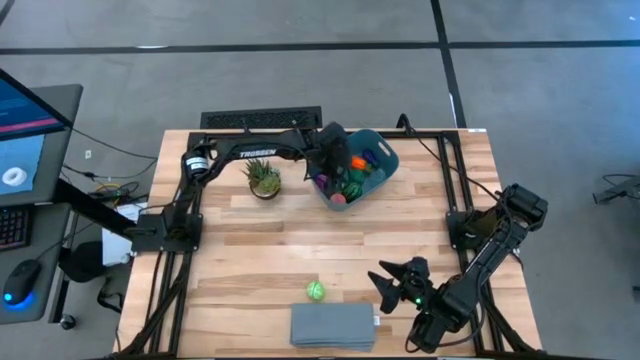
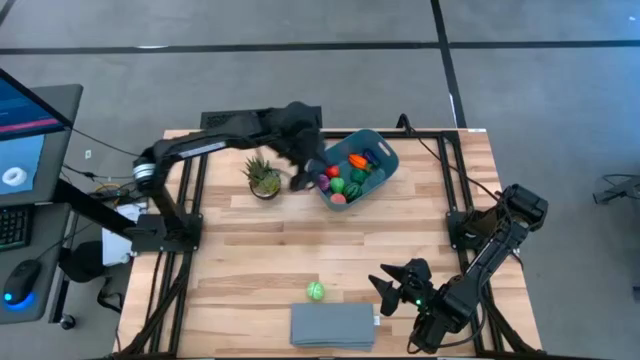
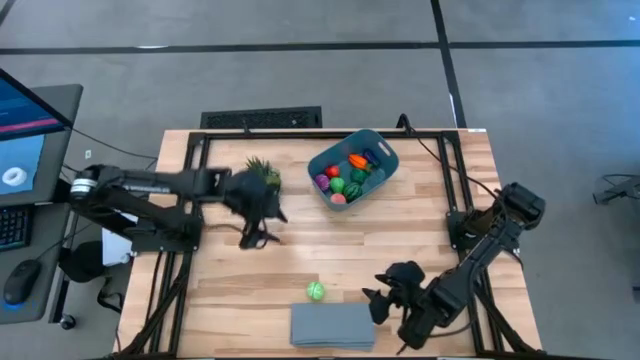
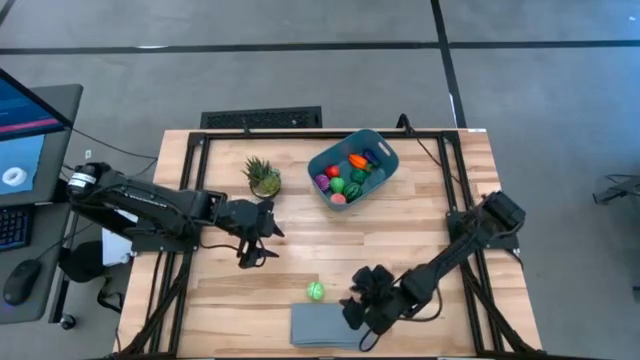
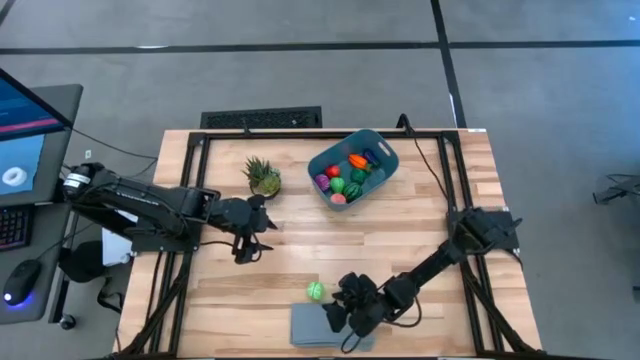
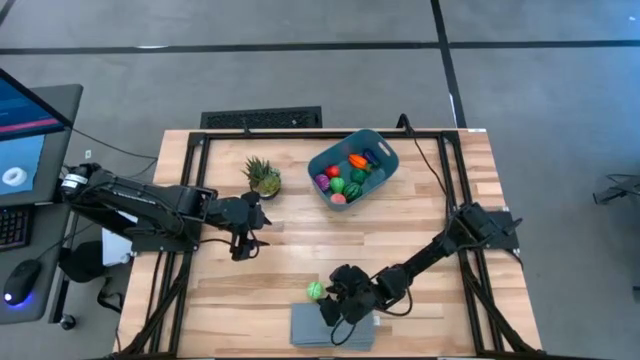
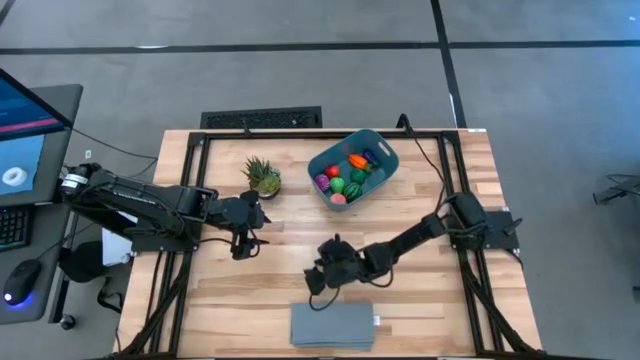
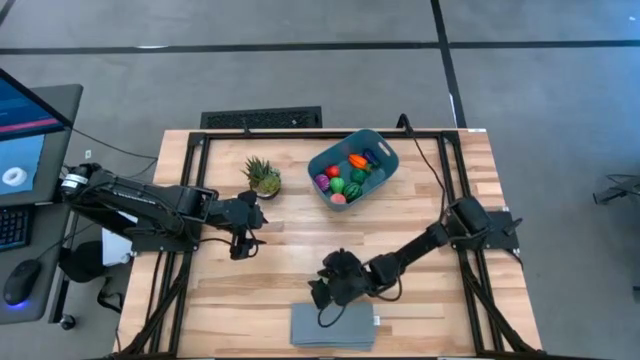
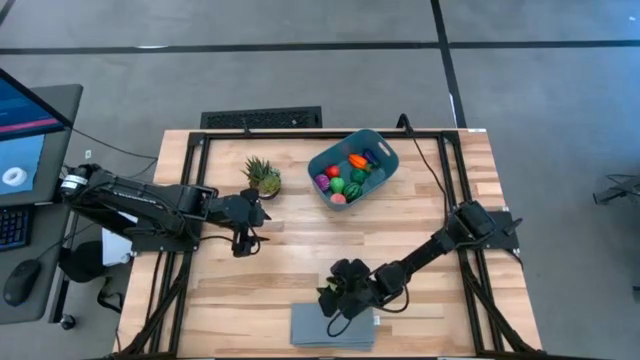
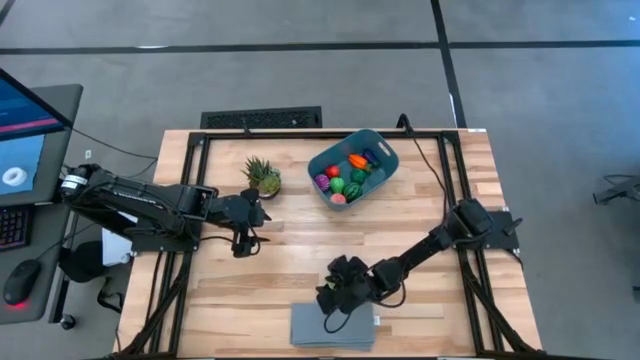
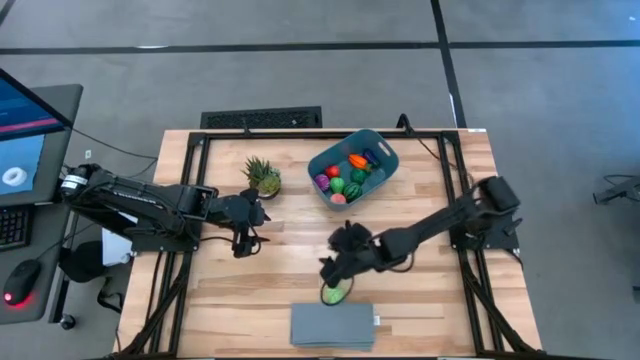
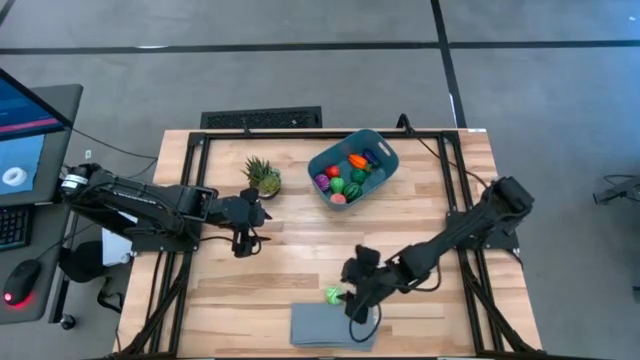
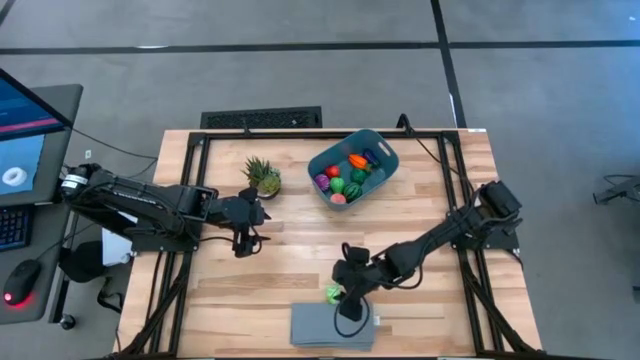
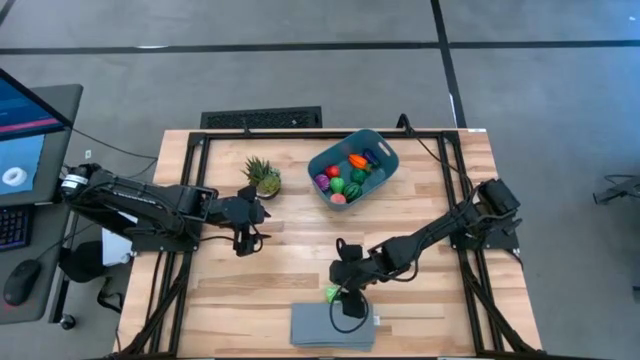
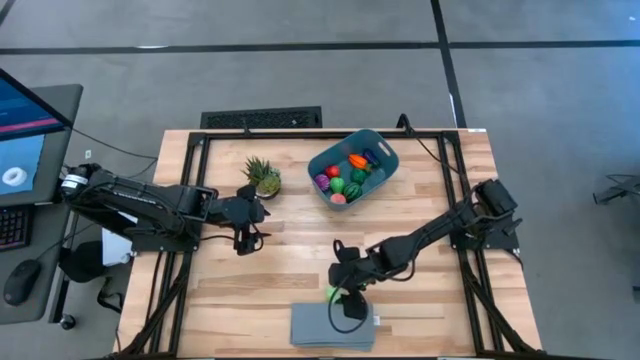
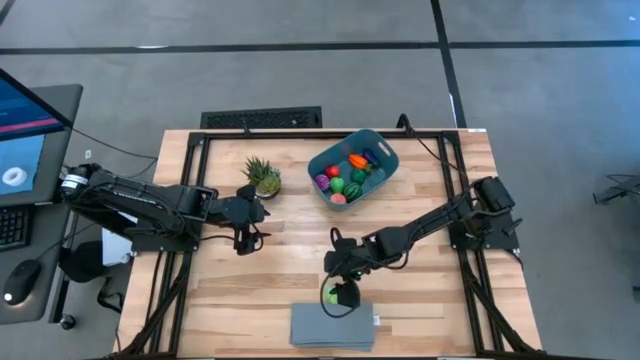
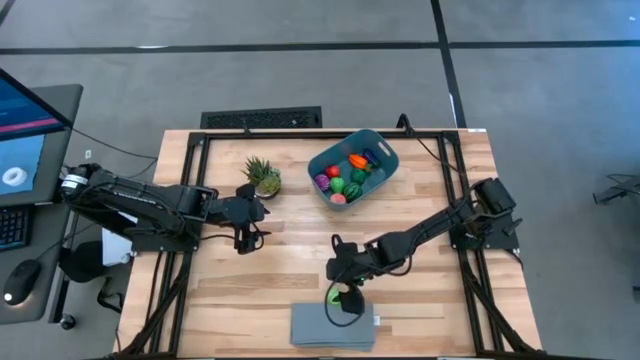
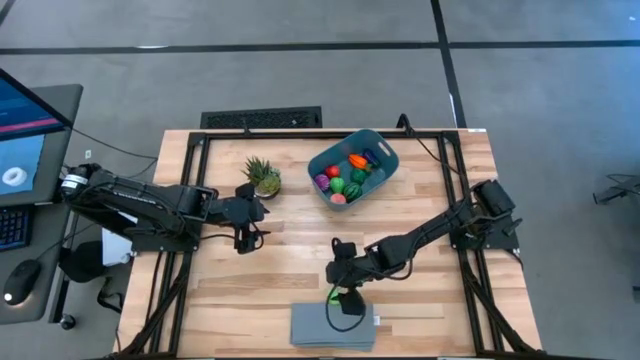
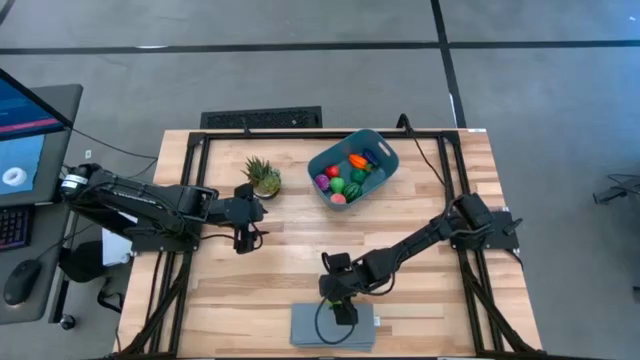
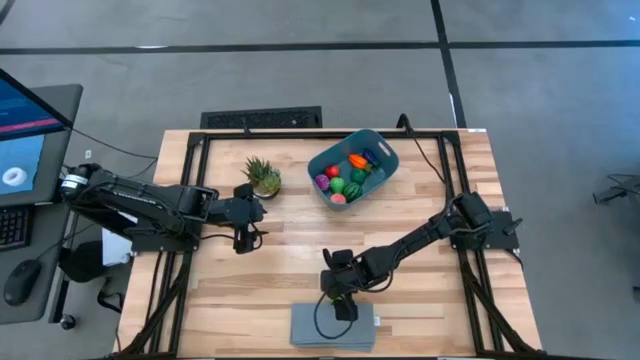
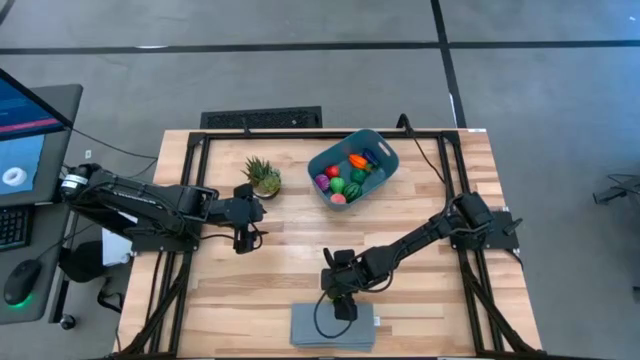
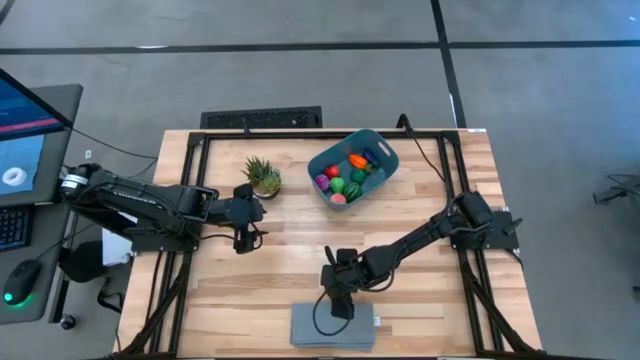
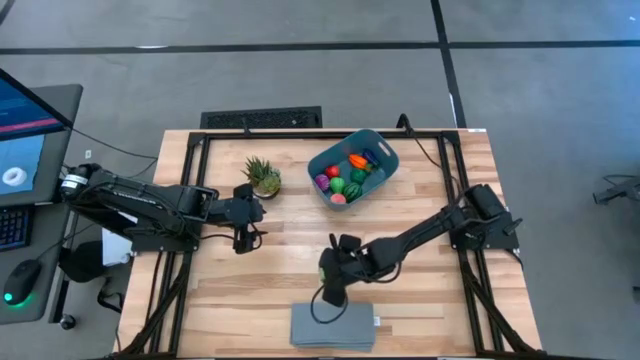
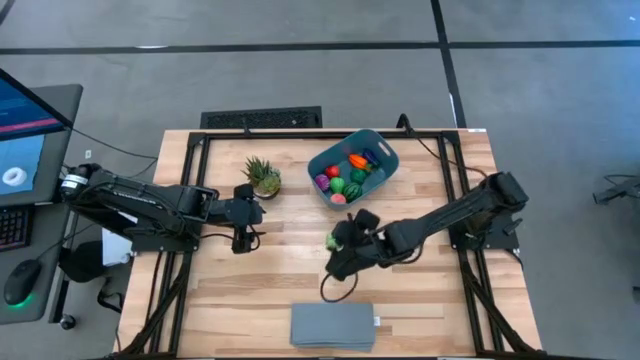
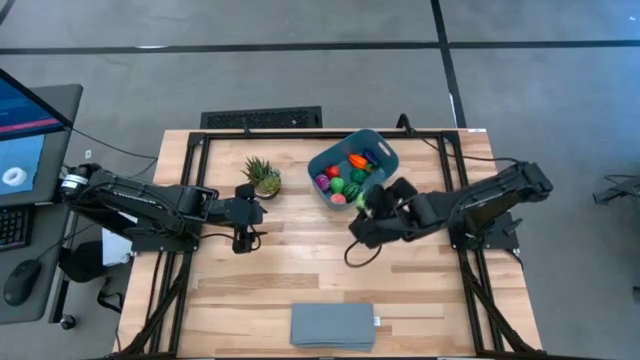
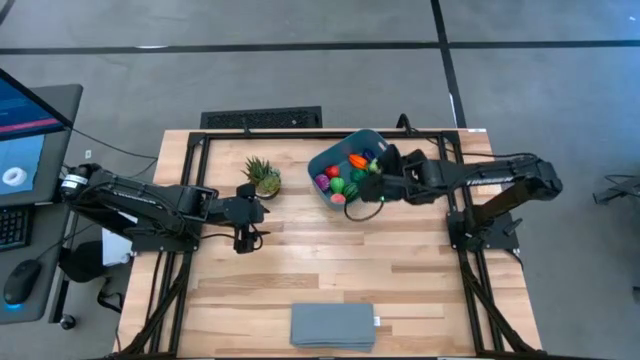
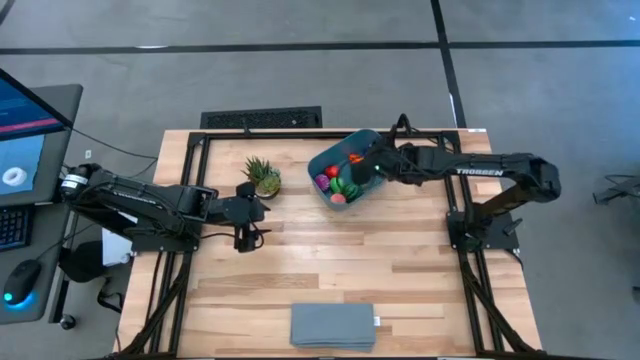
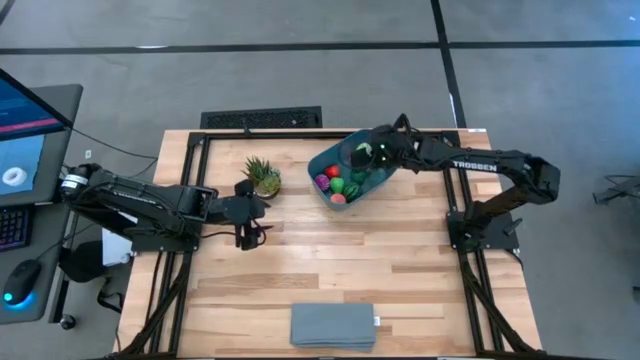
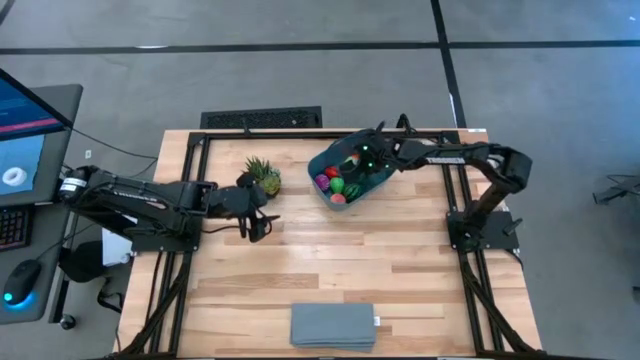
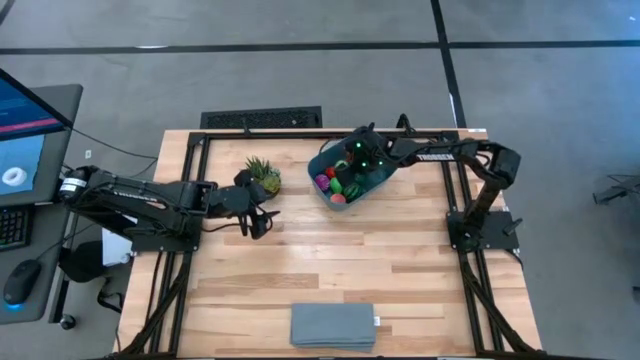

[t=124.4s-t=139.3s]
Task: Pick and placing Produce into tupperware
Put the cabbage into the bin
